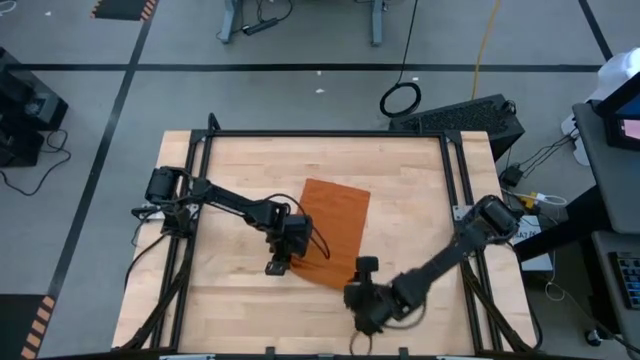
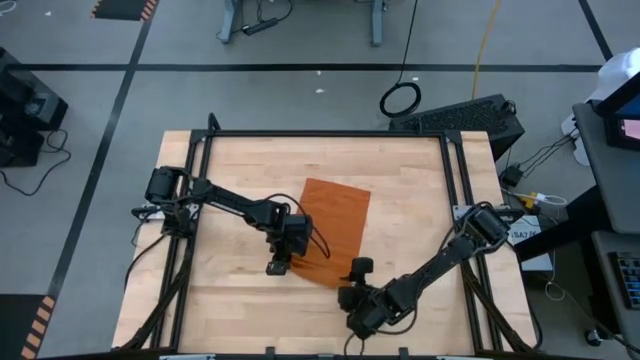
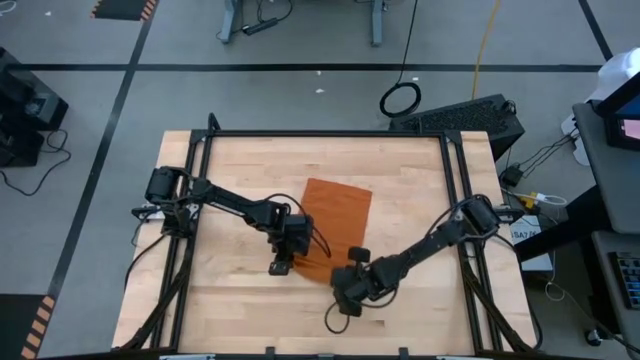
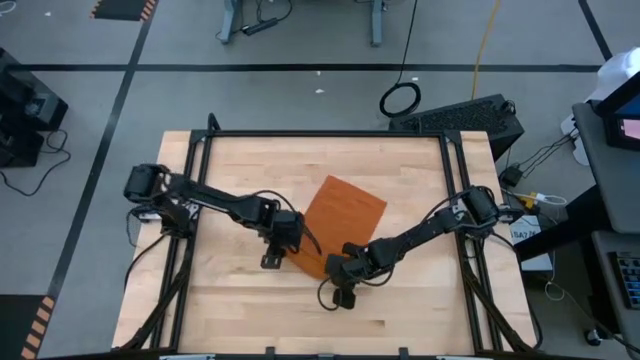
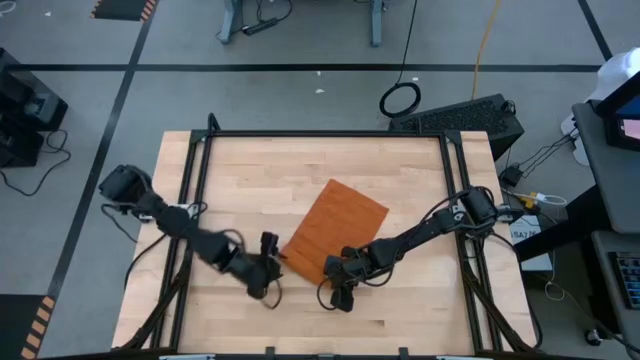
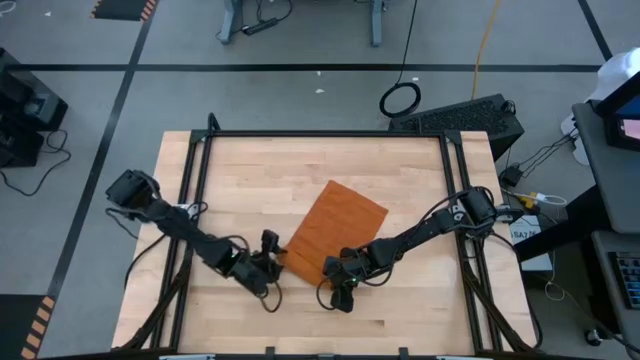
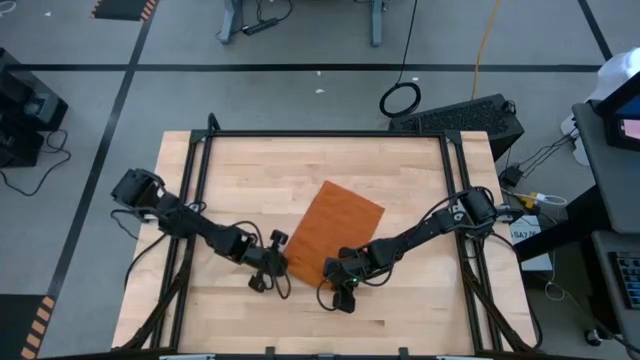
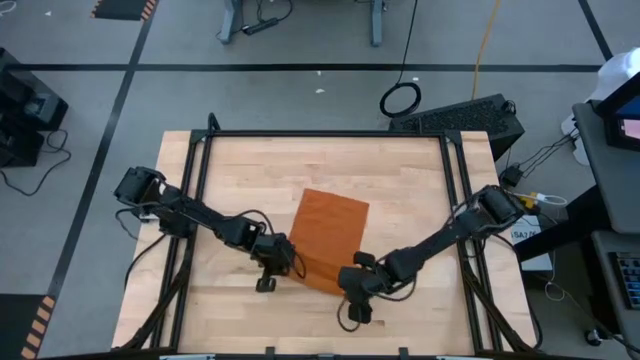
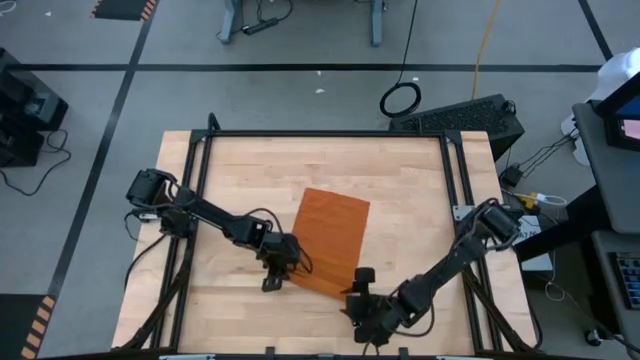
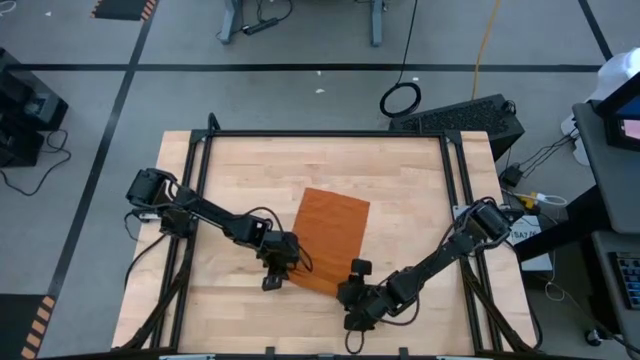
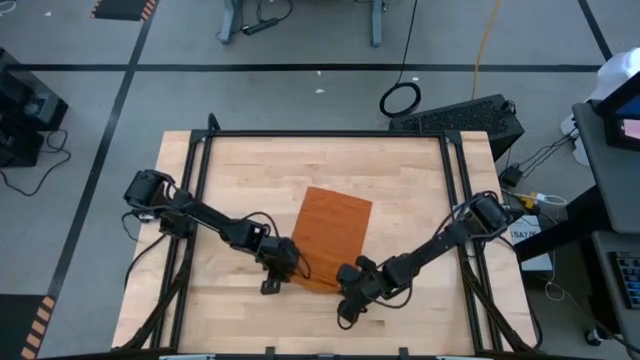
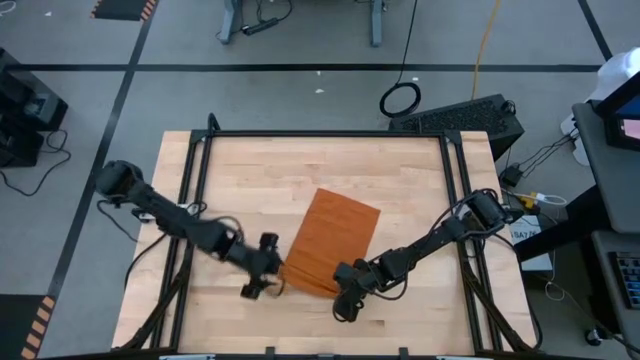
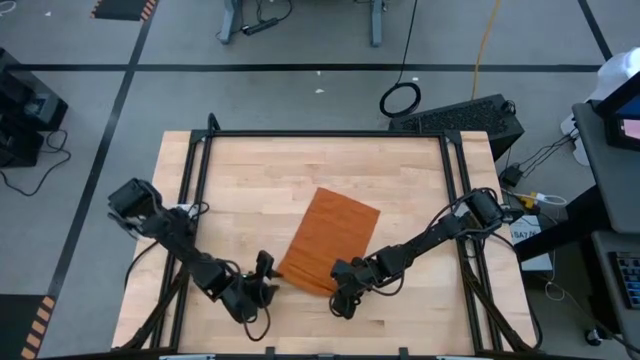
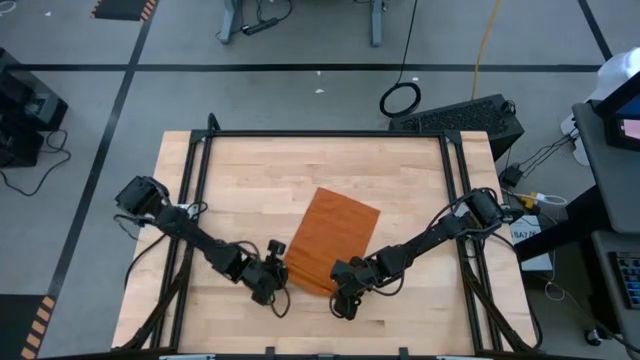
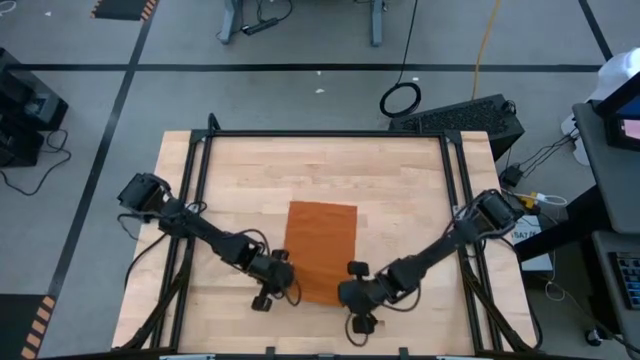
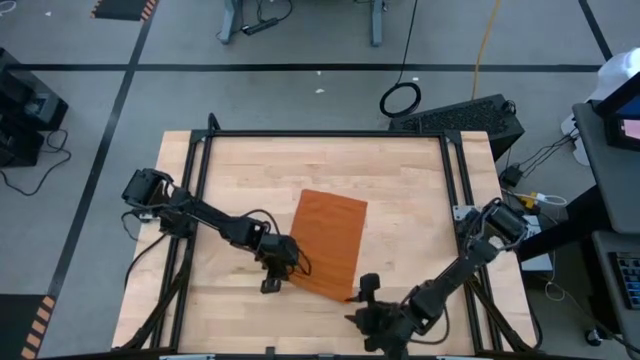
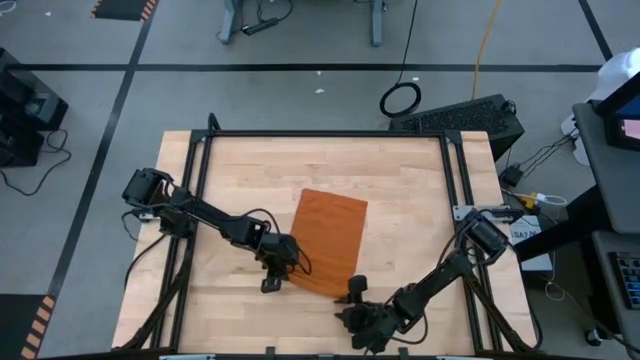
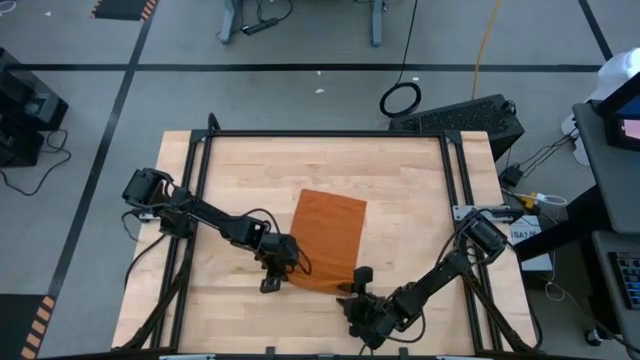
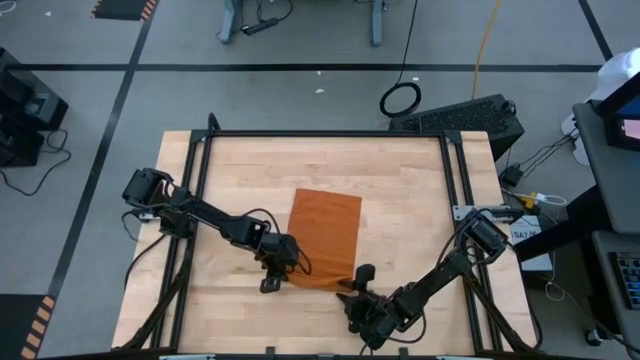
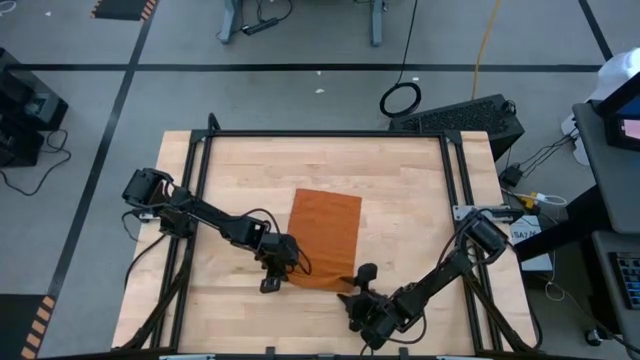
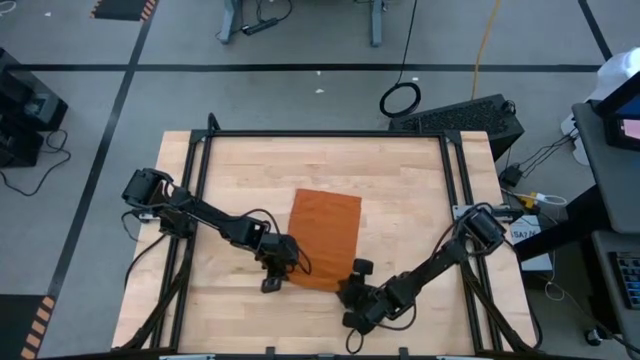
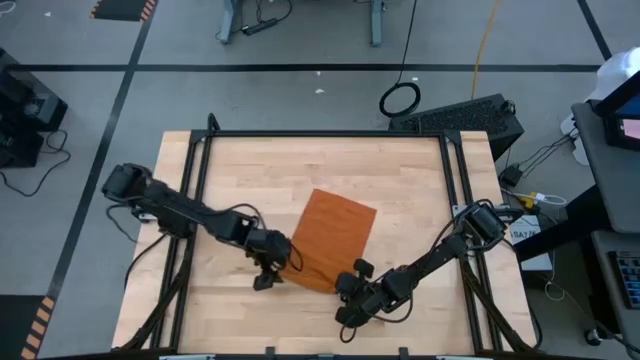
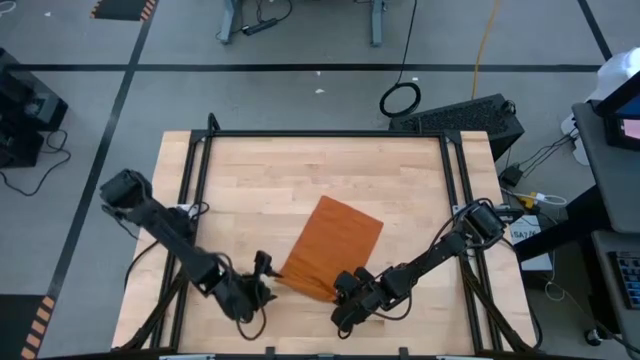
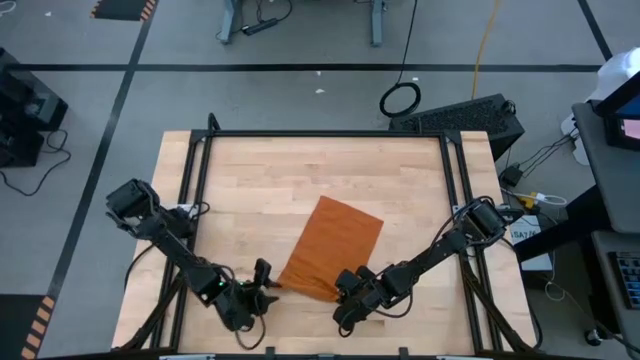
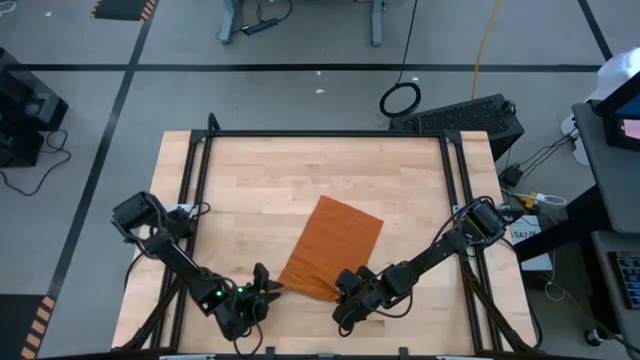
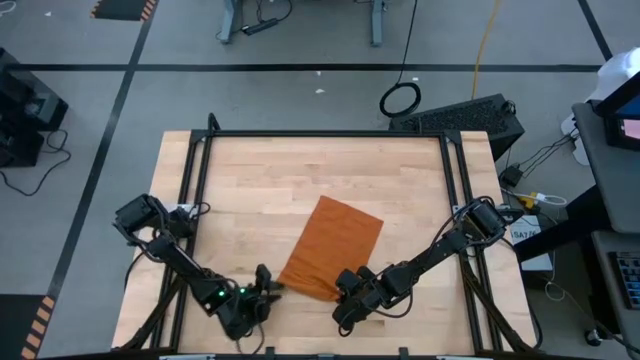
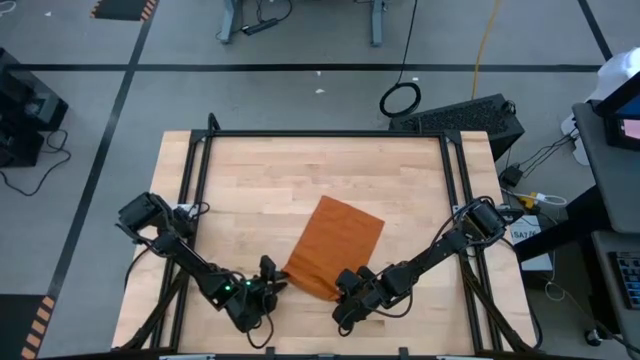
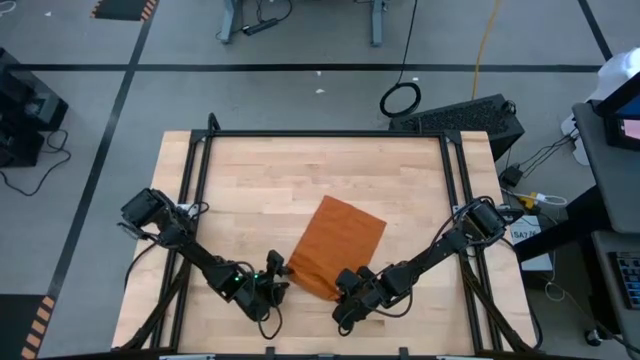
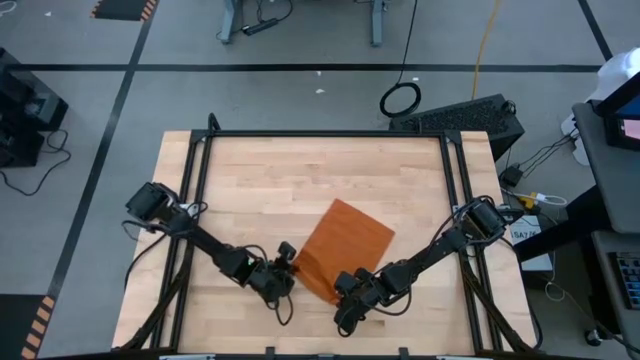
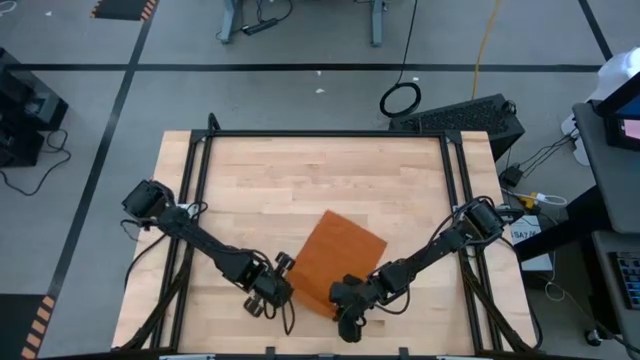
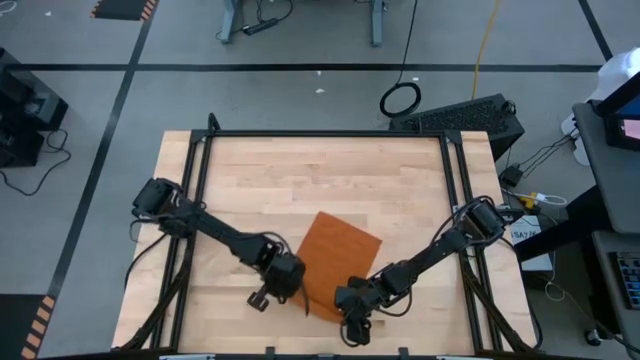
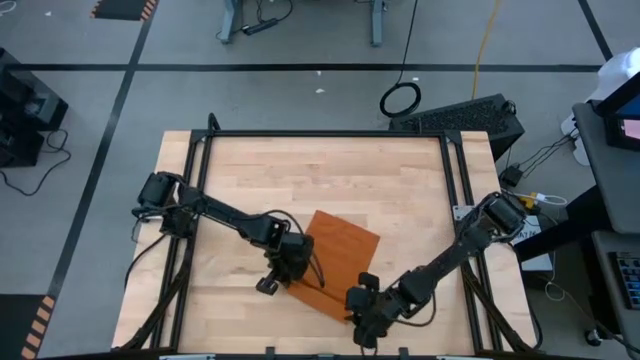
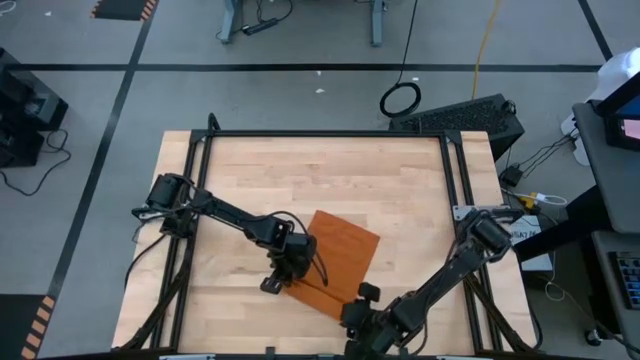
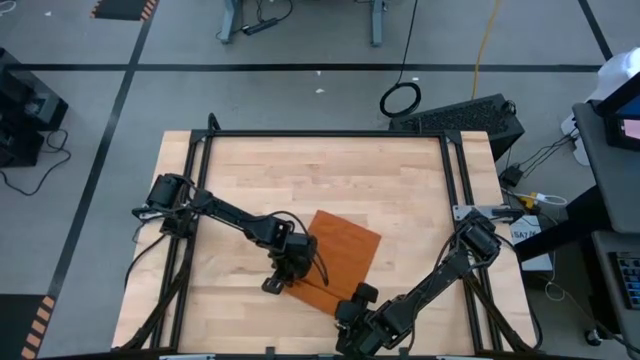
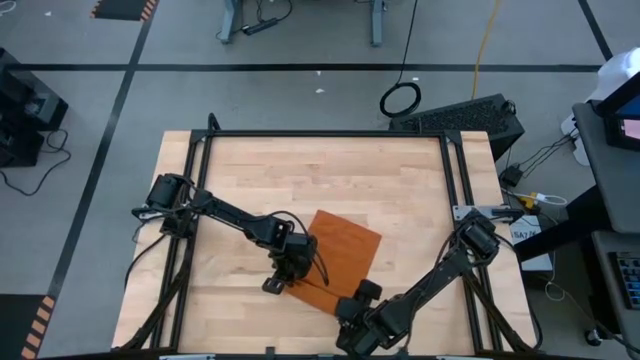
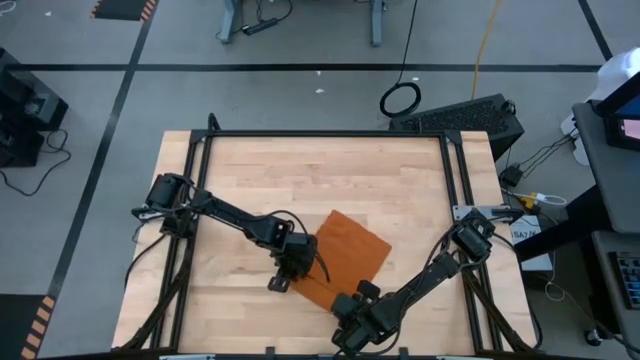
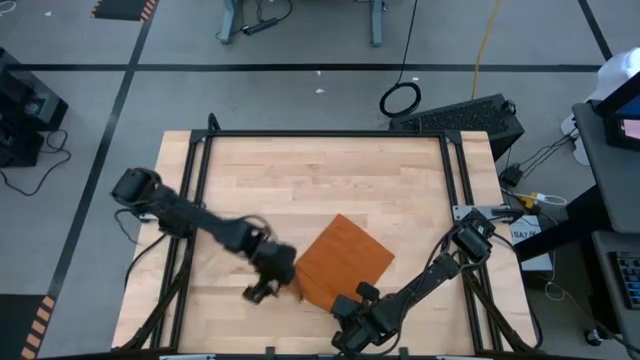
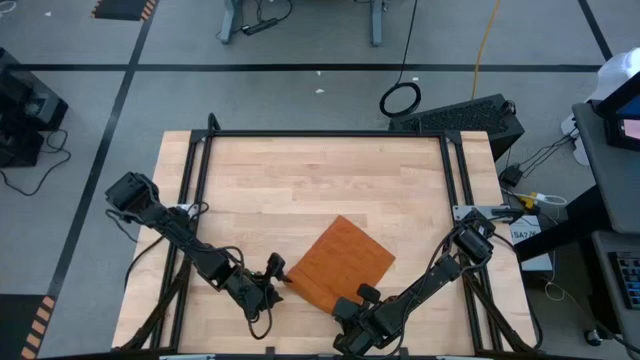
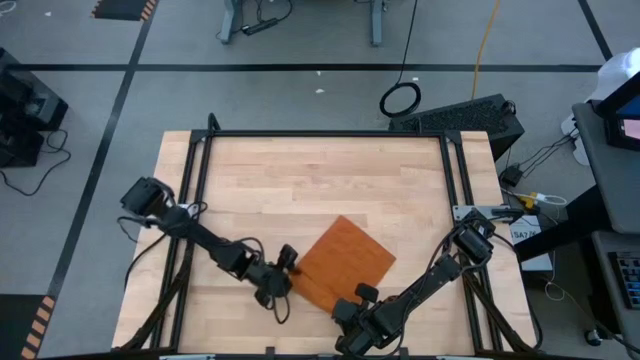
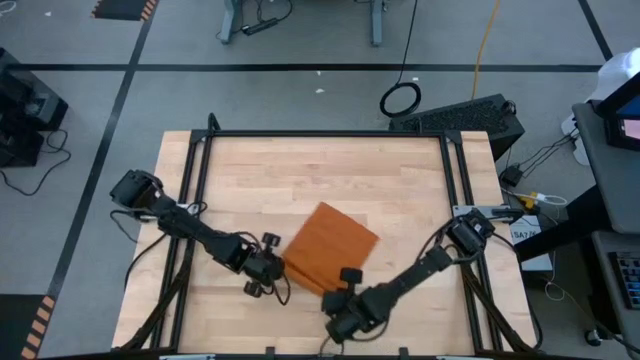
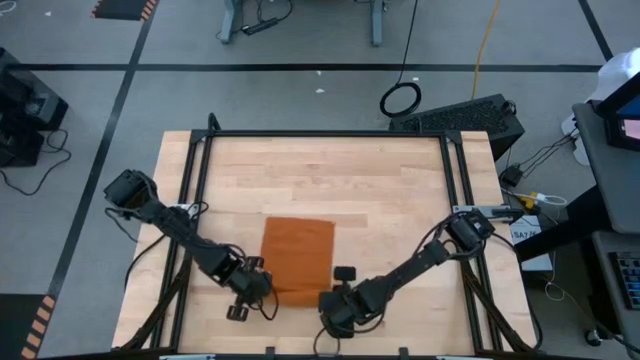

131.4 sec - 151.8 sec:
Task: Roll towel into tight, uniform cylinder
Roll the brown towel

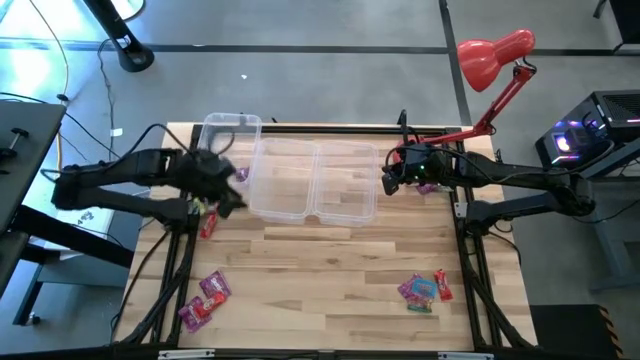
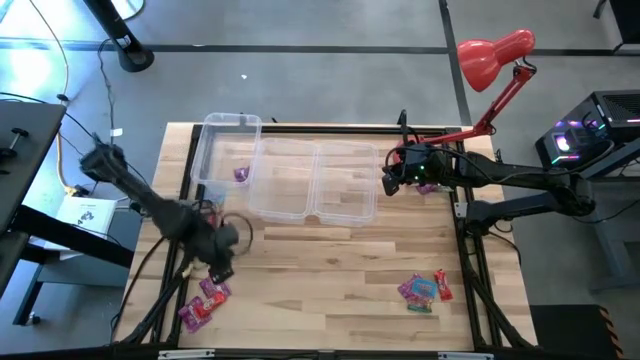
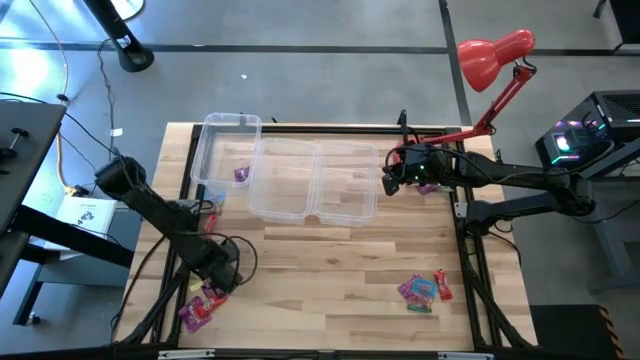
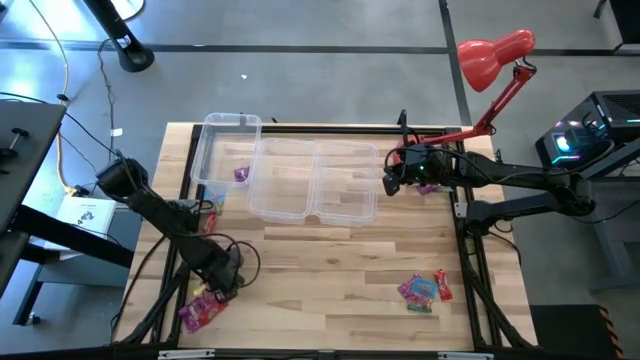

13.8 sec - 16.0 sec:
Task: Sort candy
Put the violet candy bag into the left transparent bin
